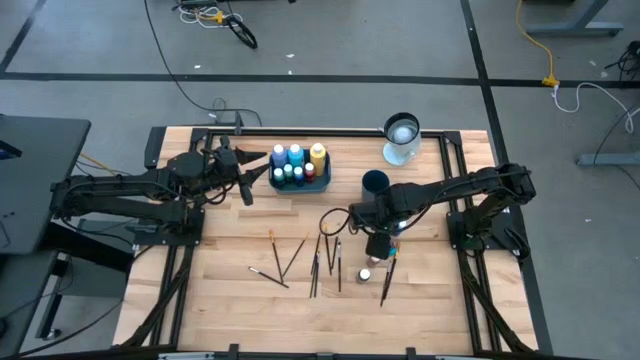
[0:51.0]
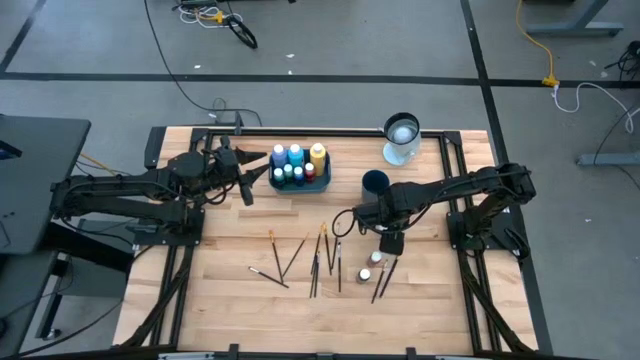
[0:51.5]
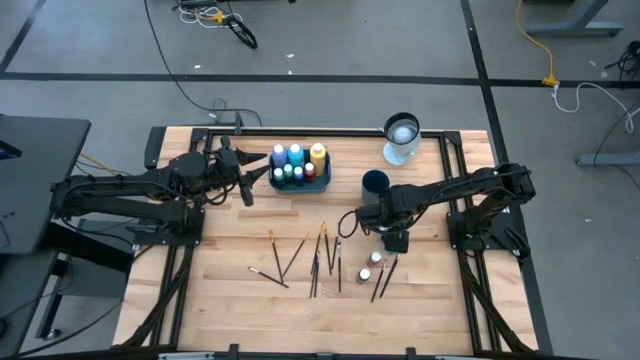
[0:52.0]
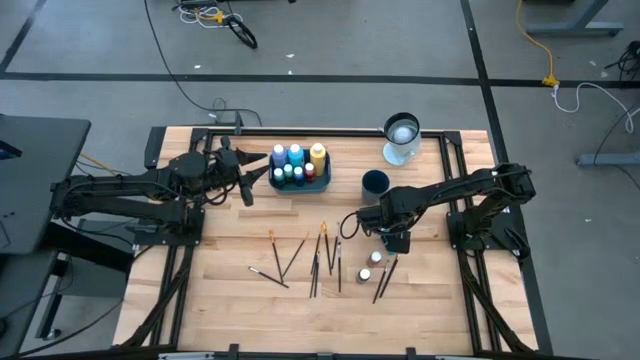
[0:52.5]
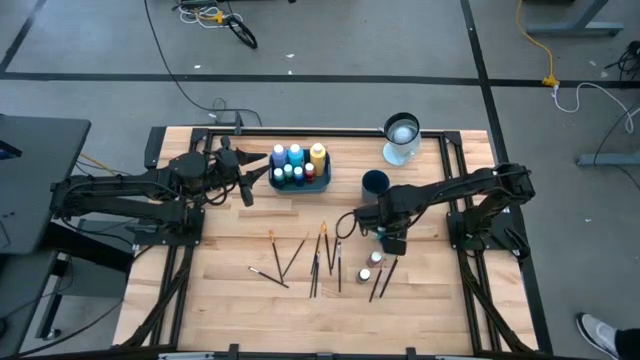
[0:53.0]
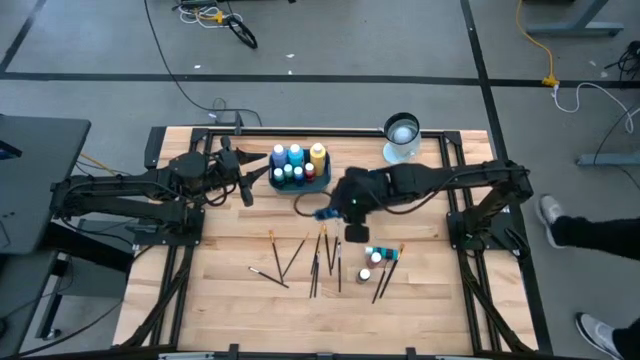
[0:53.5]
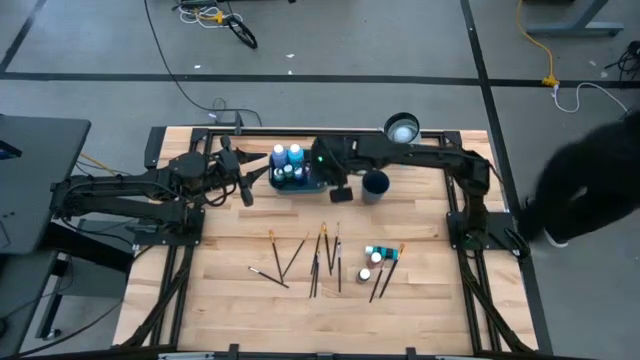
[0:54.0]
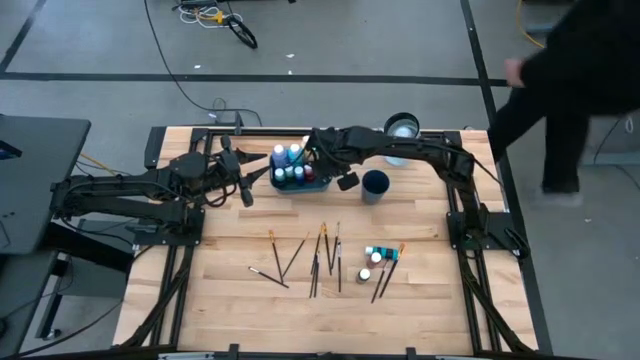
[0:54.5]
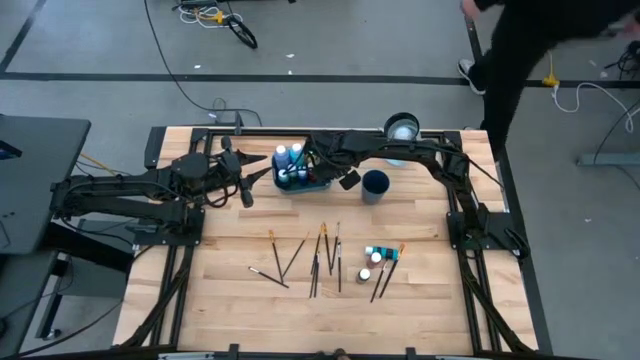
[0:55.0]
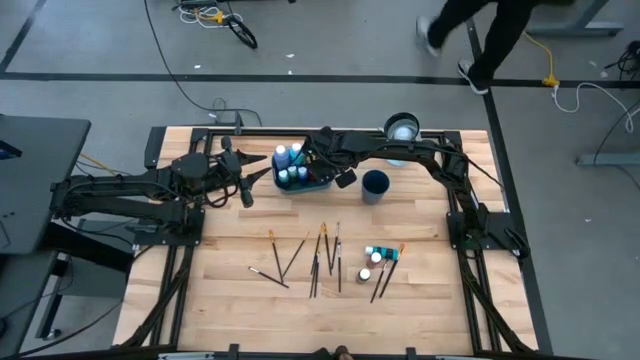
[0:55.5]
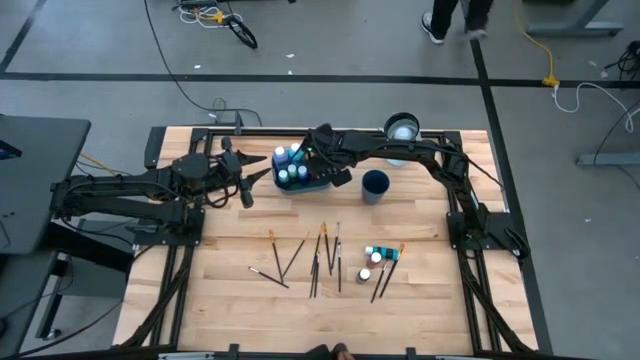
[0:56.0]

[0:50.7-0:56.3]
Task: Pick & Place Paint Supplies
Put the blue paint bottle into the blue bin

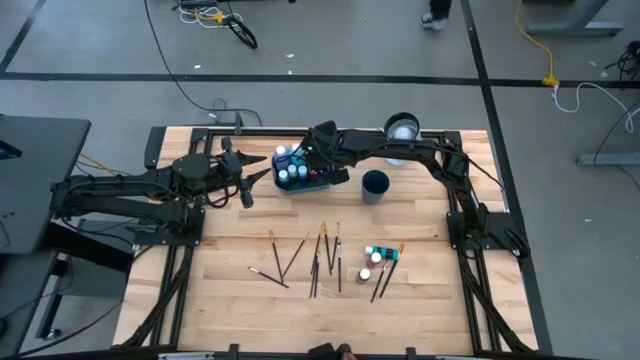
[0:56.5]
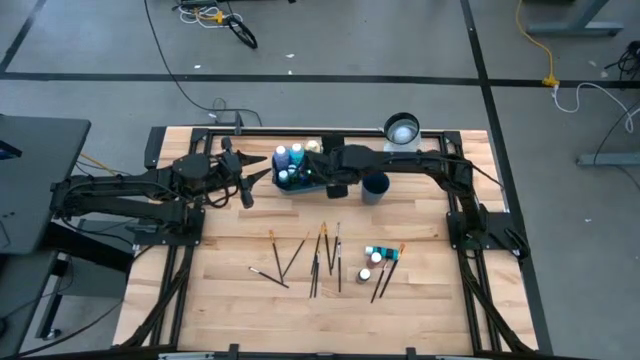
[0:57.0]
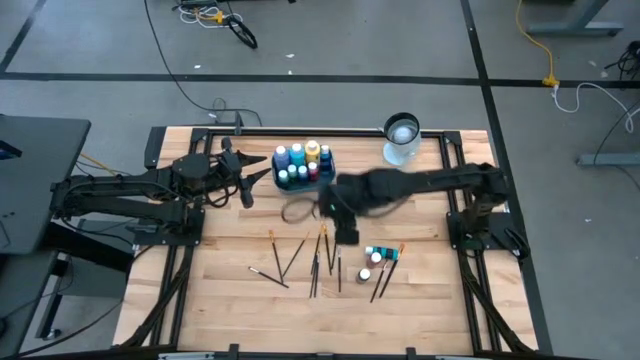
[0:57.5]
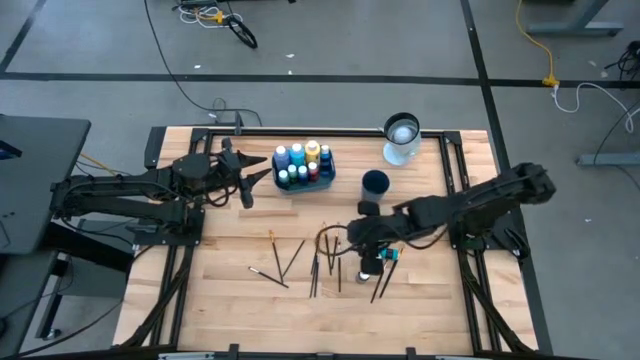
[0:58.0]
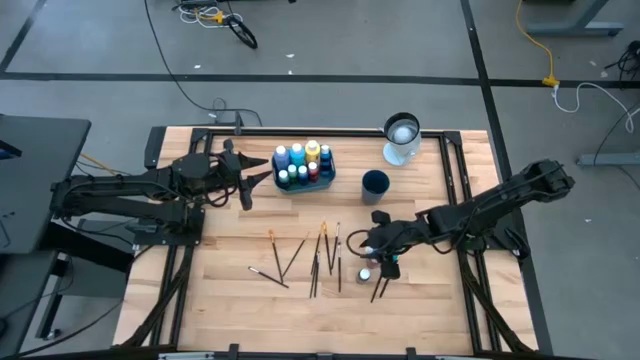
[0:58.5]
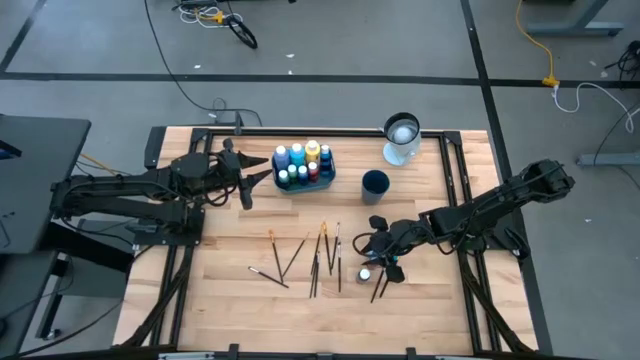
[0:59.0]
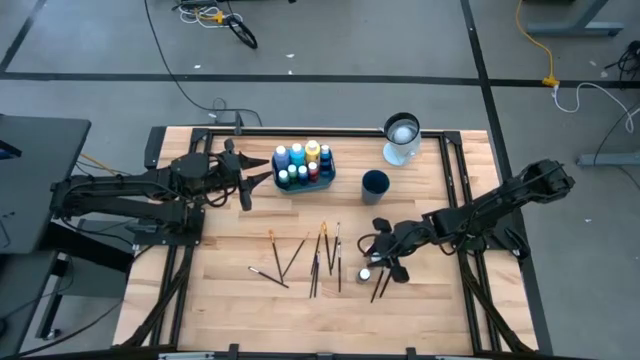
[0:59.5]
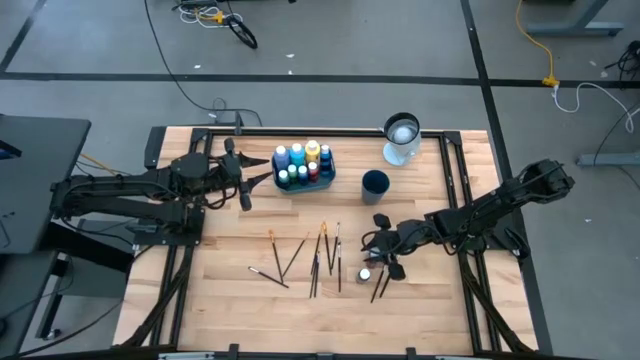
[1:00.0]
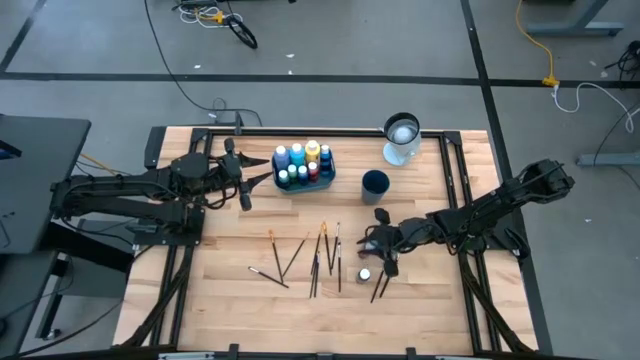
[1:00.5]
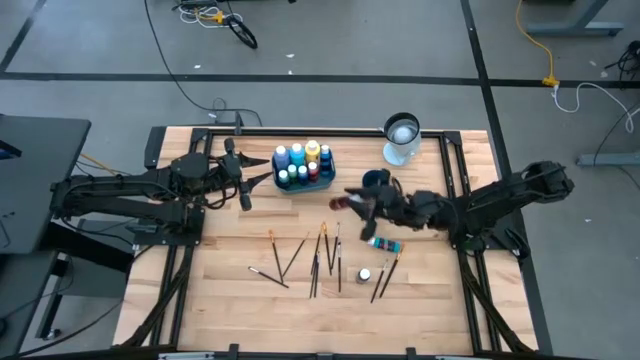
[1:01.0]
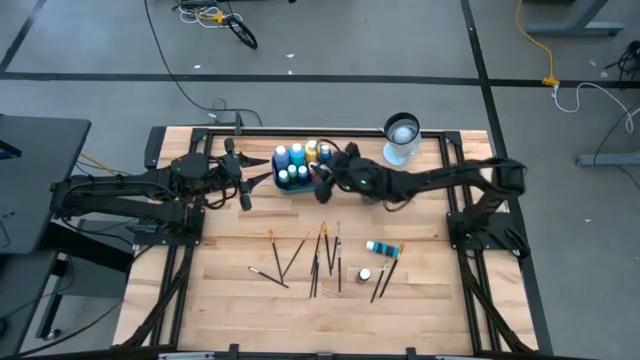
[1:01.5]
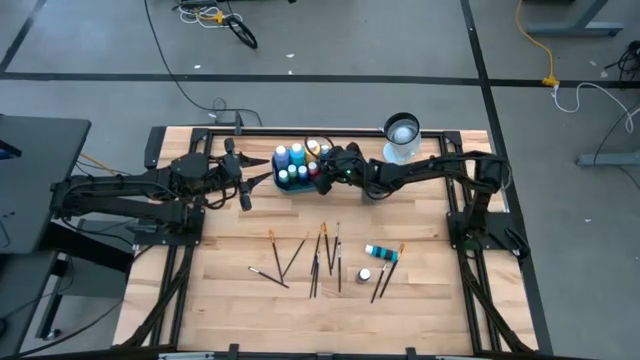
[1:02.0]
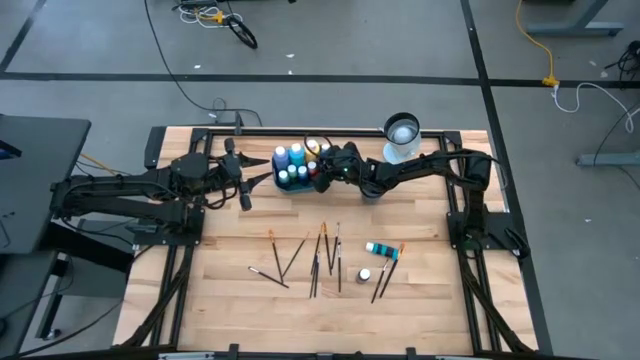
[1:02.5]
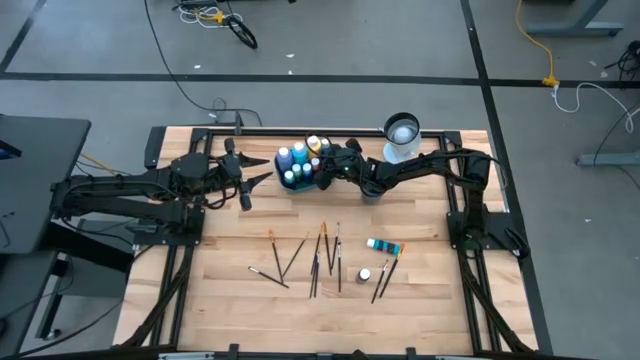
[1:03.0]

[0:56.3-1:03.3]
Put the red paint bottle into the blue bin

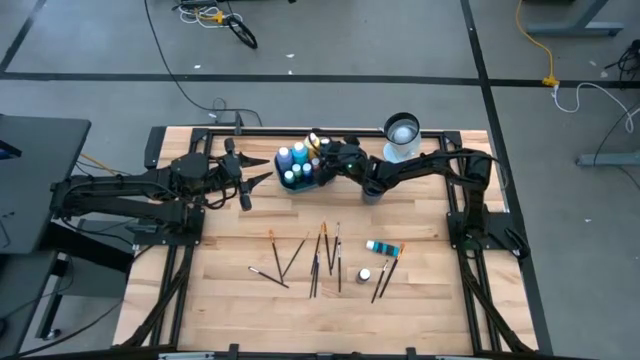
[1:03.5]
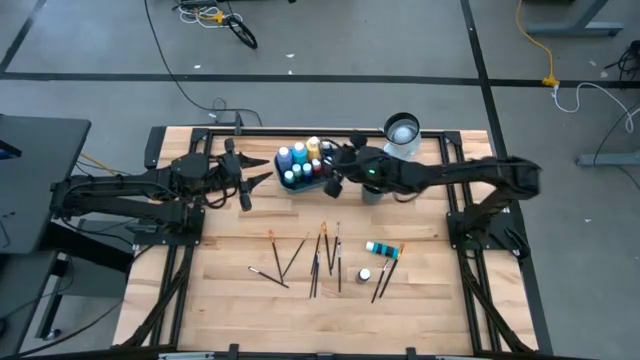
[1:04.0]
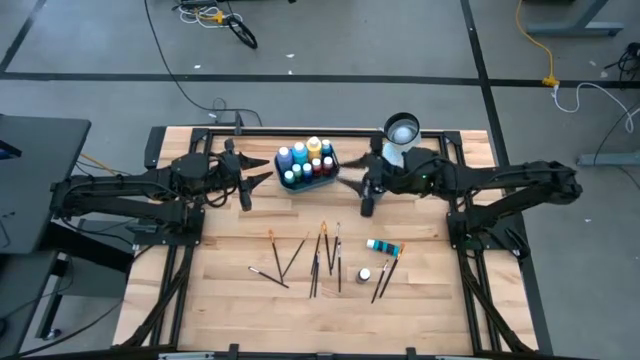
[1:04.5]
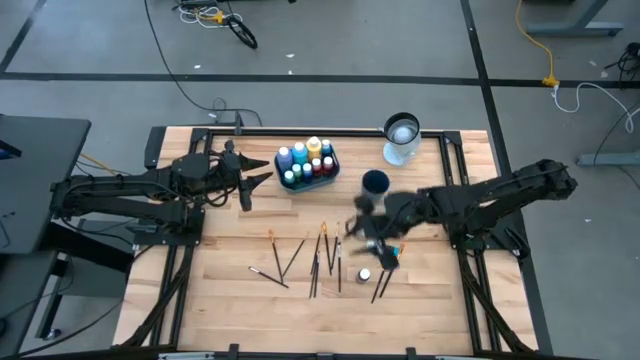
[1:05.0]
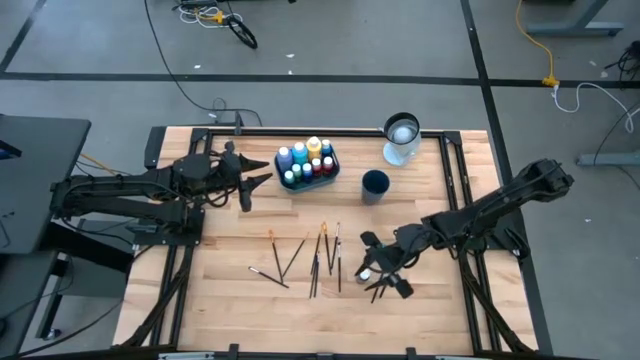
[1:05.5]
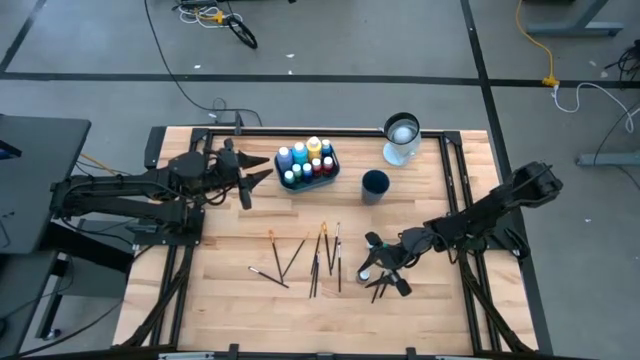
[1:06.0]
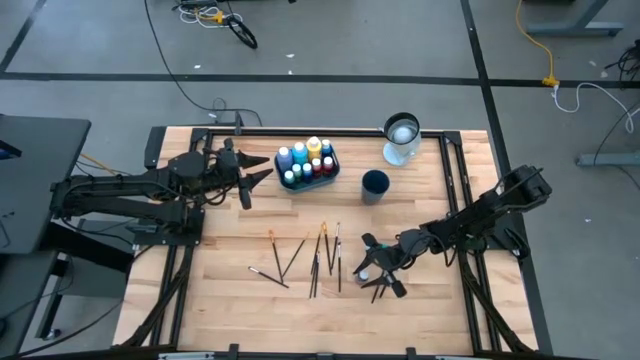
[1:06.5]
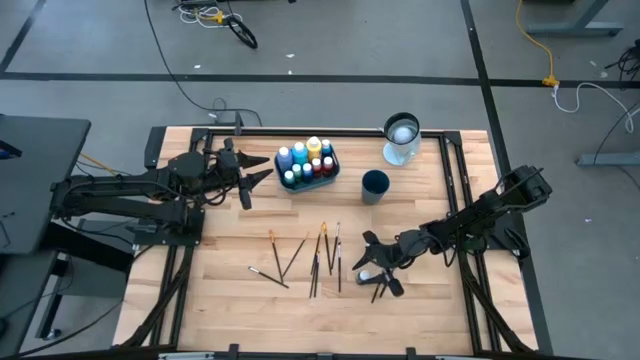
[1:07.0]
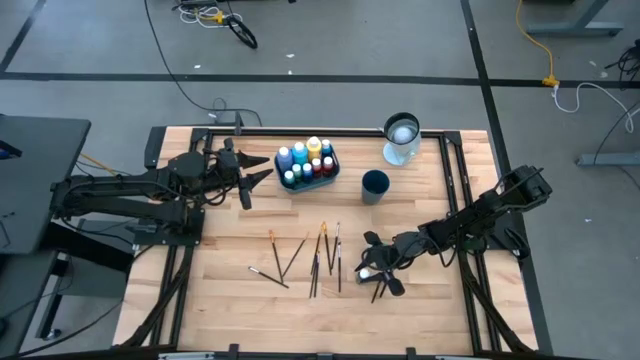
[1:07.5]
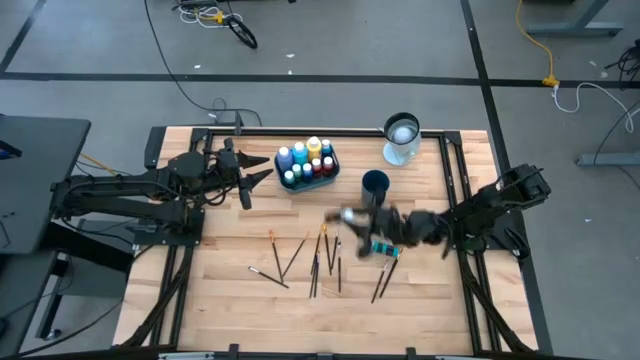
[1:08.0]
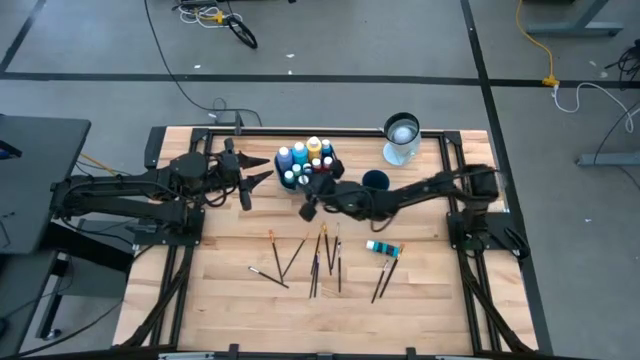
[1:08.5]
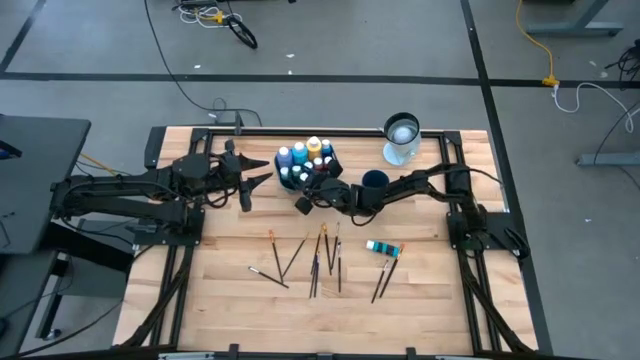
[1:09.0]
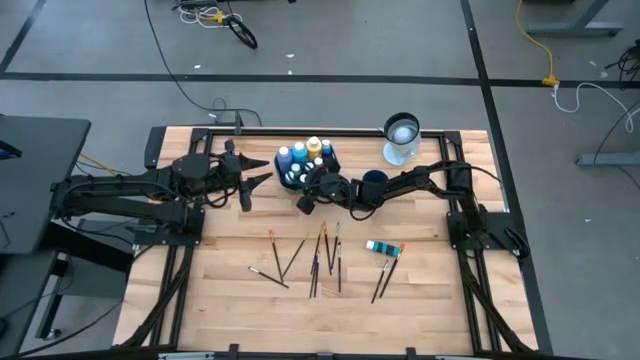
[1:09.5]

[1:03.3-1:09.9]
Put the black paint bottle into the blue bin

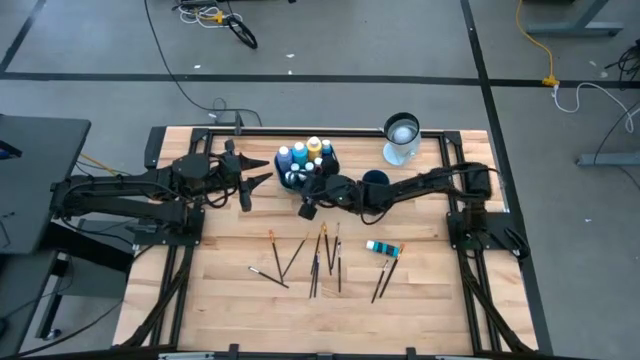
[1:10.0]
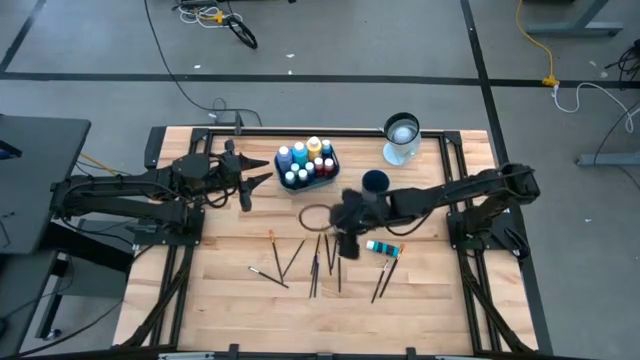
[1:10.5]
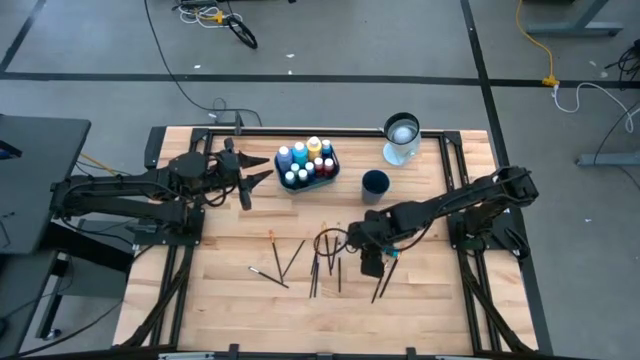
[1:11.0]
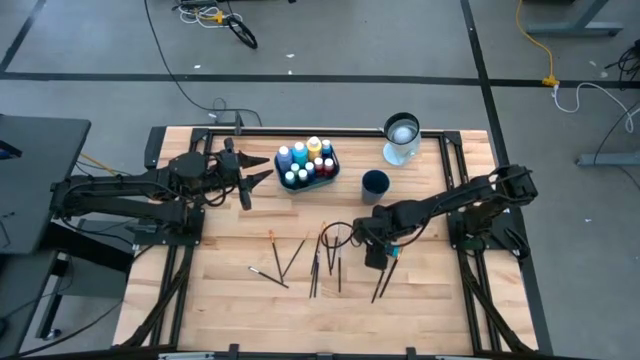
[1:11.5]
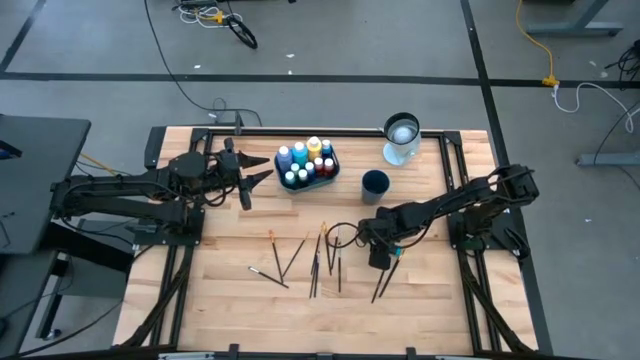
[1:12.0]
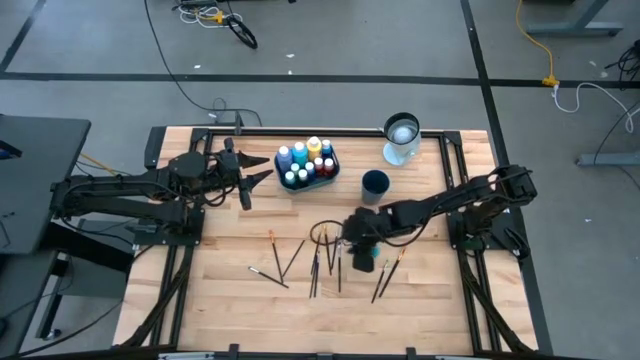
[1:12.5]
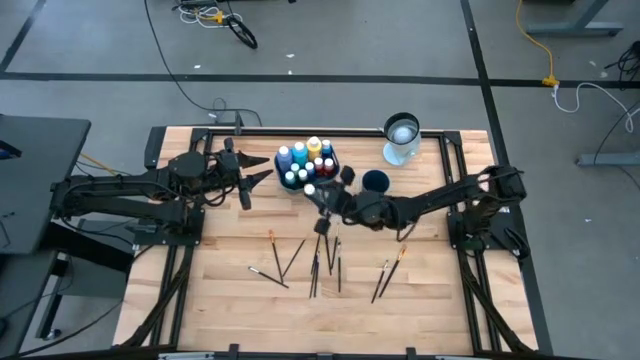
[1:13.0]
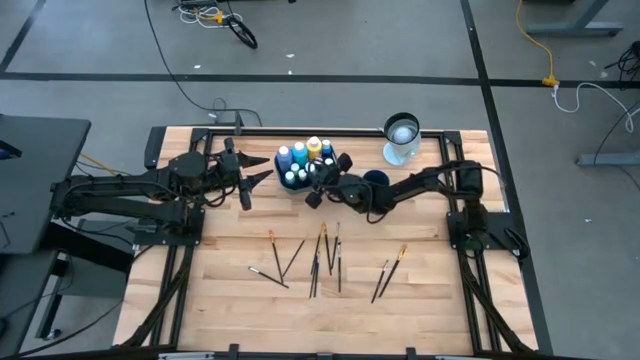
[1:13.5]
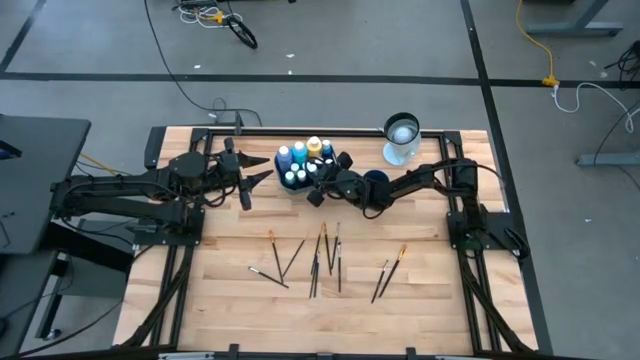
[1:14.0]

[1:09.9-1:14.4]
Put the light blue paint bottle into the blue bin
